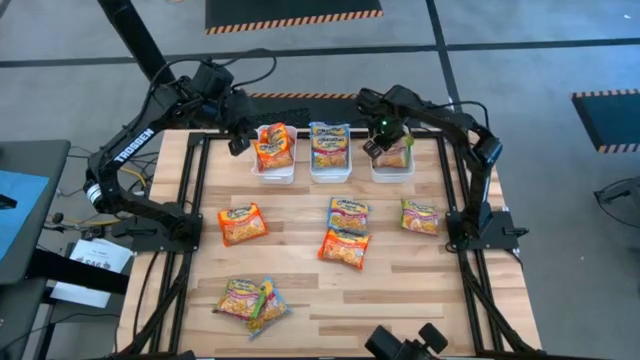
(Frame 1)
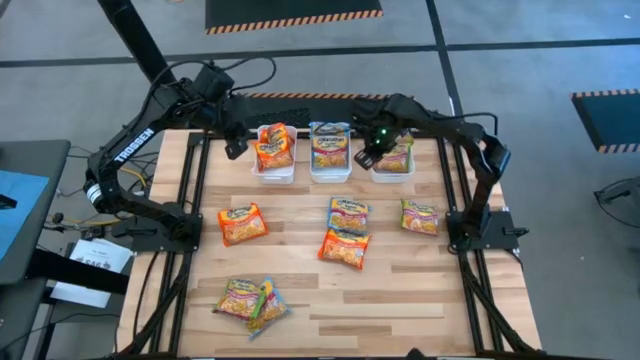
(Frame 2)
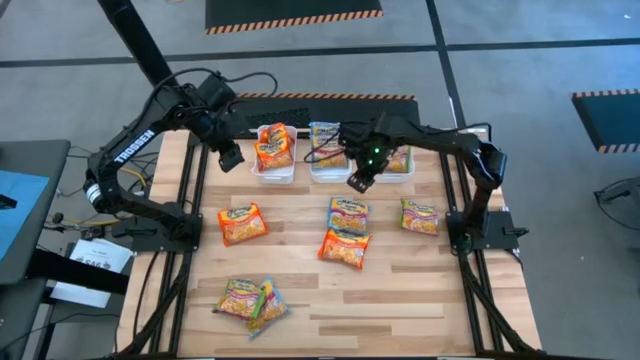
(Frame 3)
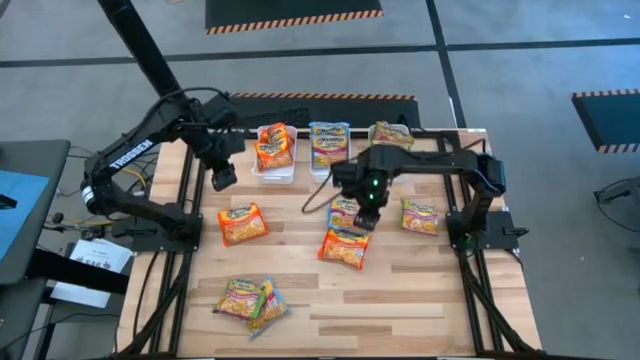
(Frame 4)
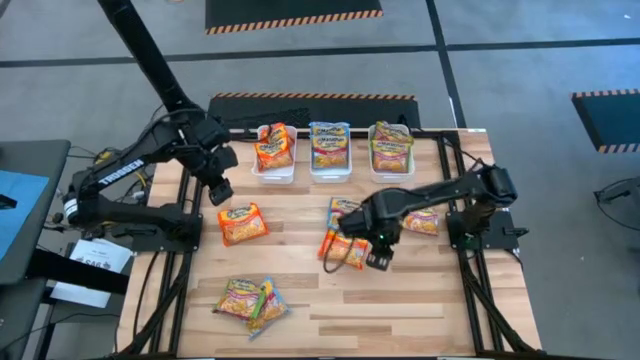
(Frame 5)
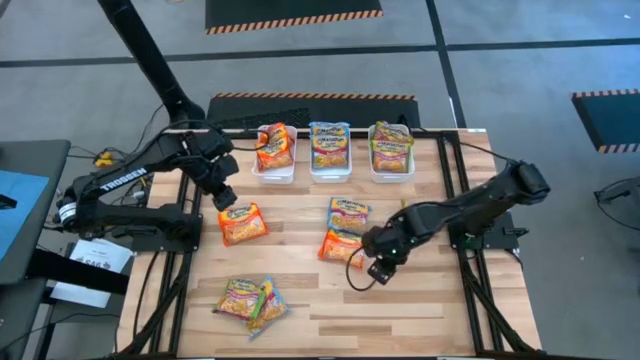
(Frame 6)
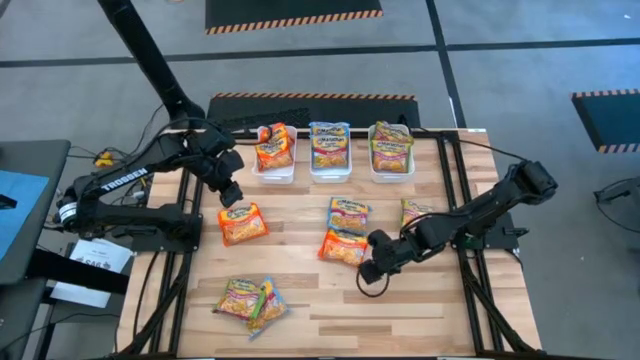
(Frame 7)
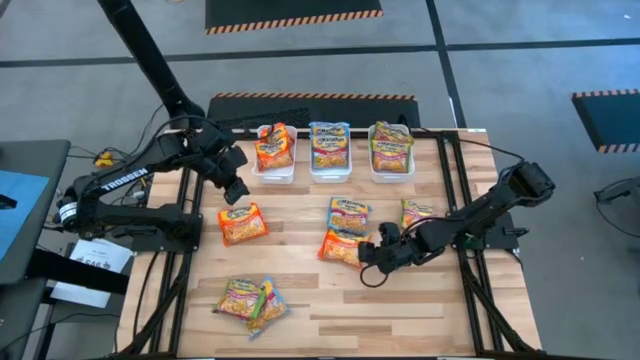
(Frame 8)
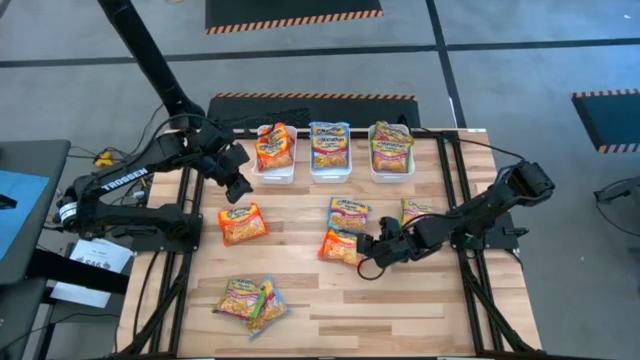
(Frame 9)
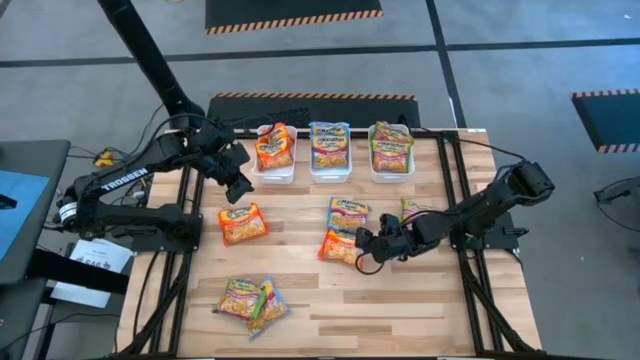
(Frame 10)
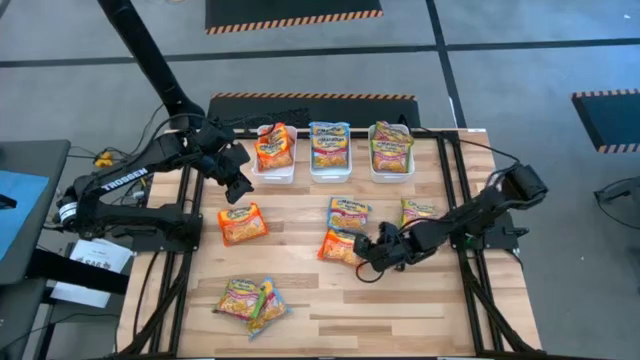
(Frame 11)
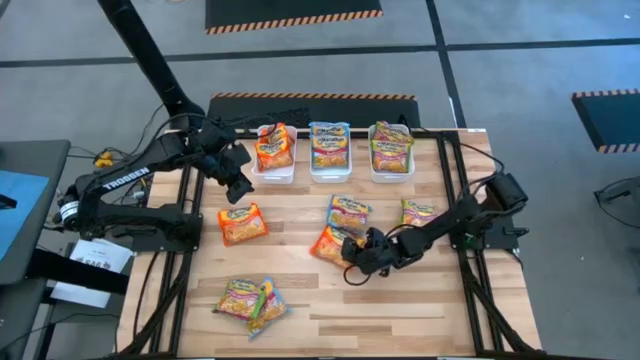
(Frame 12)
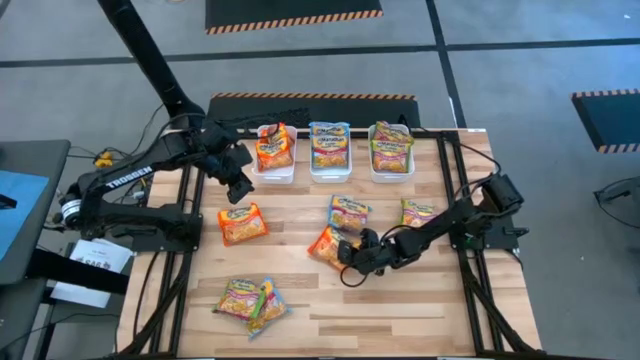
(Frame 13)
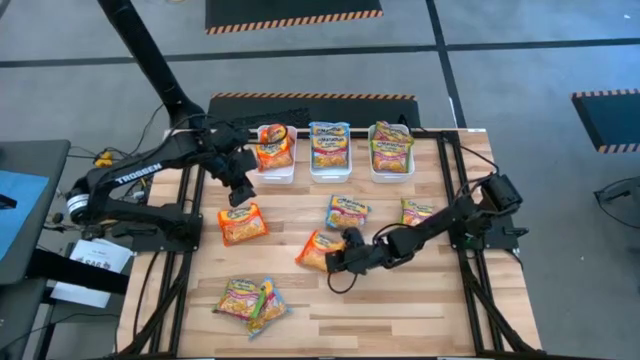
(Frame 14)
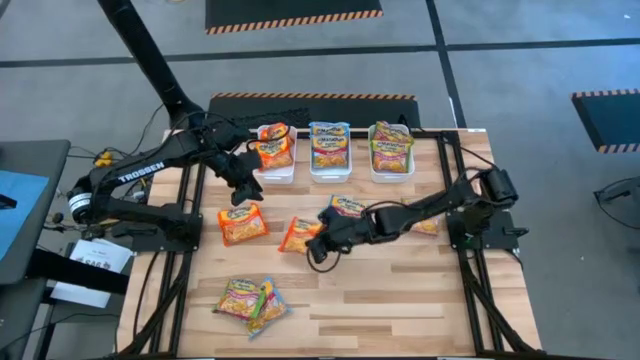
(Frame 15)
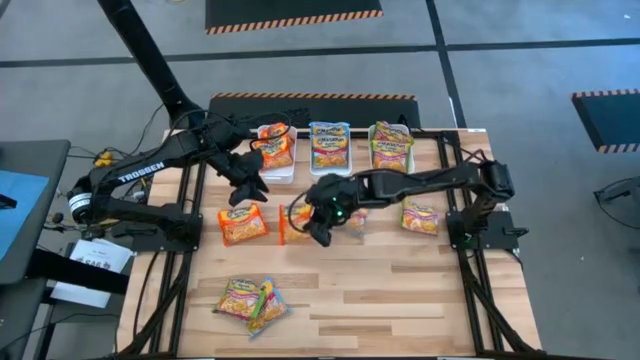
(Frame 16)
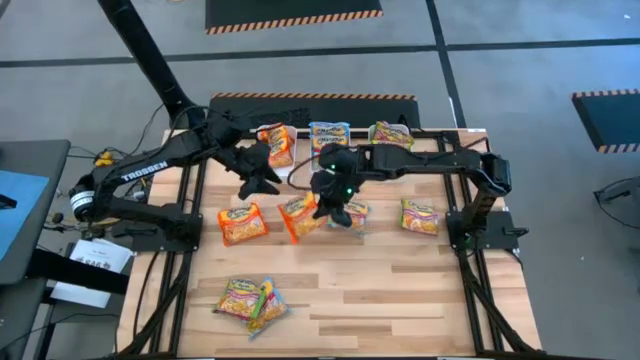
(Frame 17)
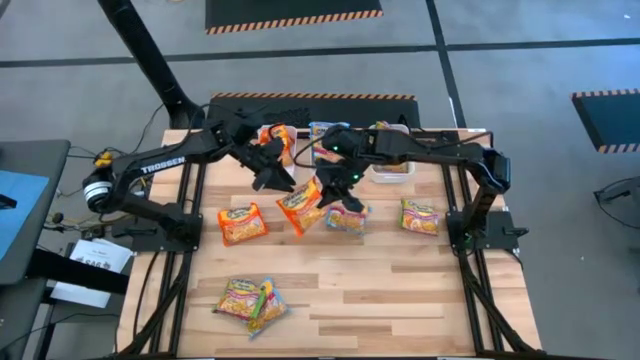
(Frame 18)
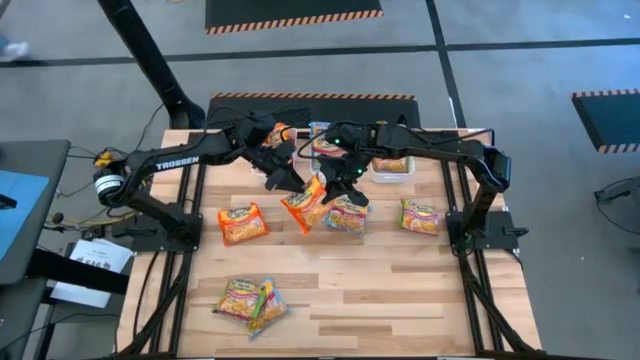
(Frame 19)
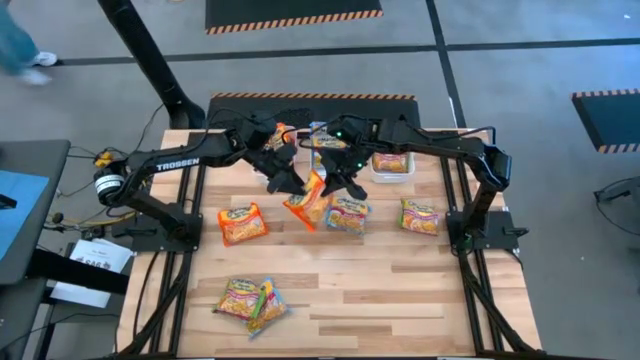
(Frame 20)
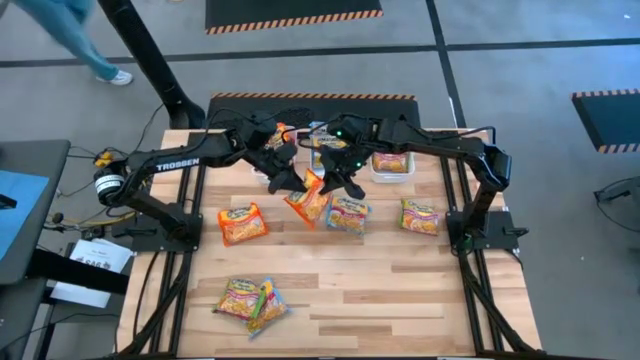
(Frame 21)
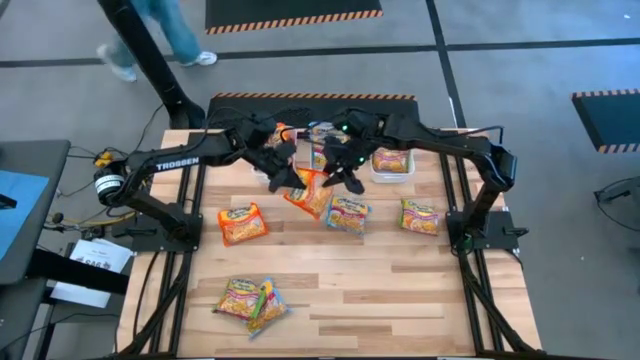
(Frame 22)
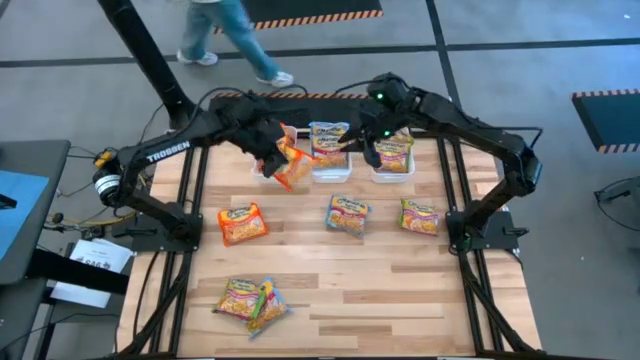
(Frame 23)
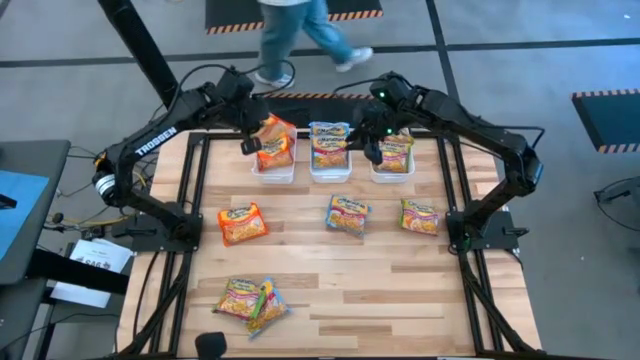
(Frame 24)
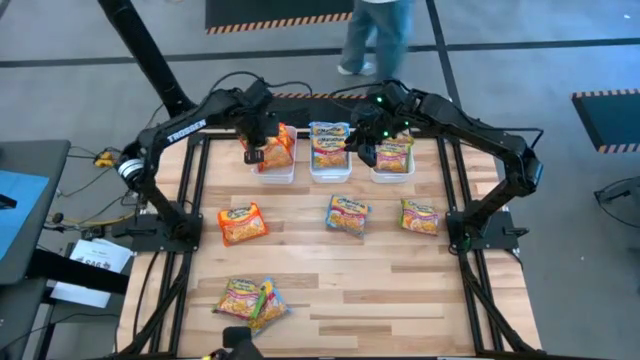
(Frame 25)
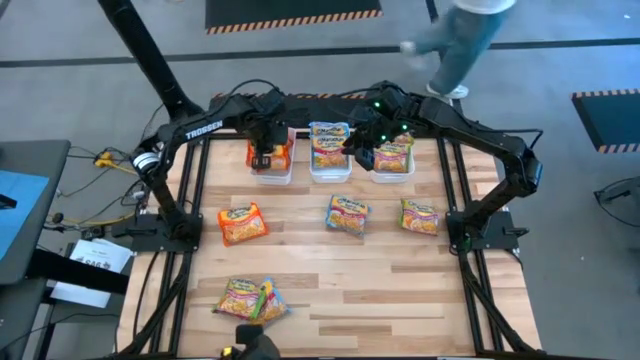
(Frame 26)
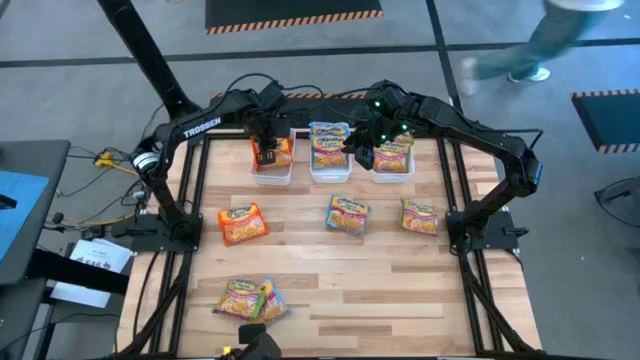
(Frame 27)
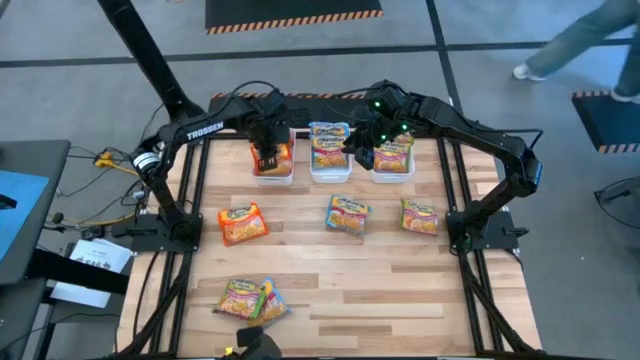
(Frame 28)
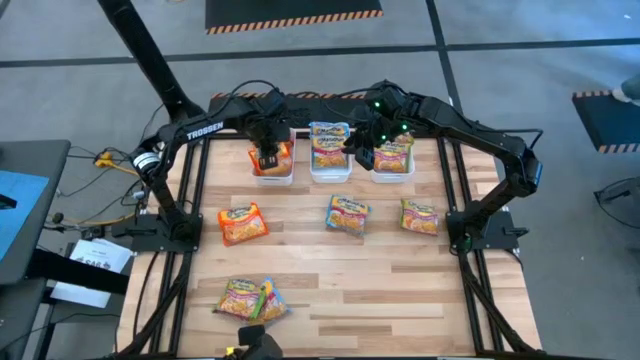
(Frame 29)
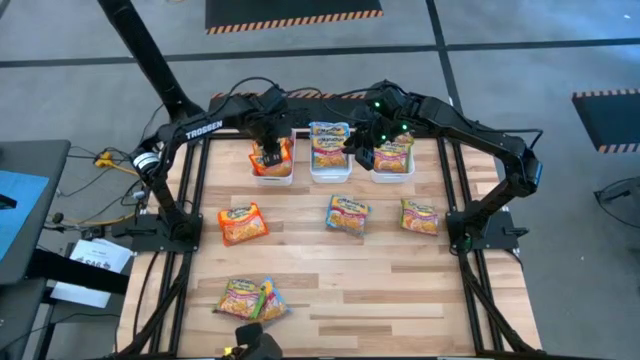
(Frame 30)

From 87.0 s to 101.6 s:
Task: Sort Maruchan noodles
Put the orange noodle pack into the left white bin

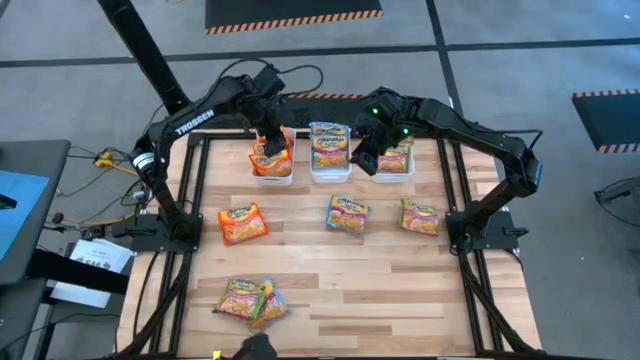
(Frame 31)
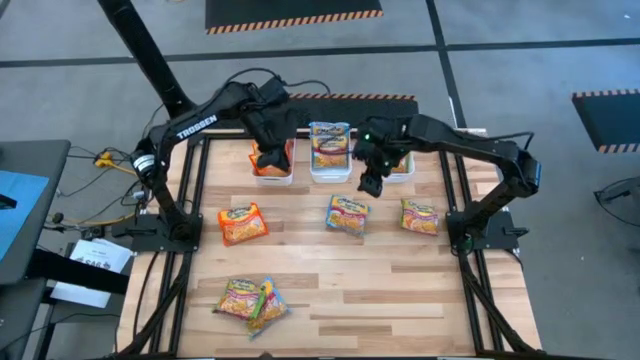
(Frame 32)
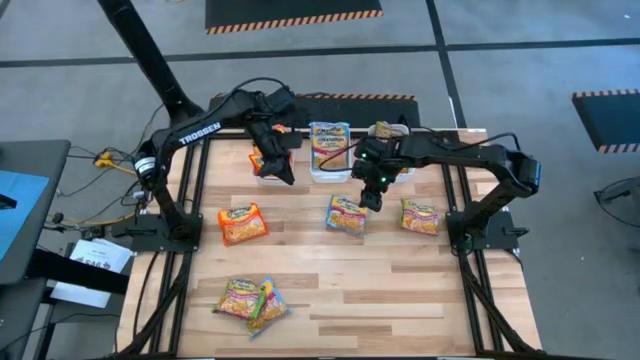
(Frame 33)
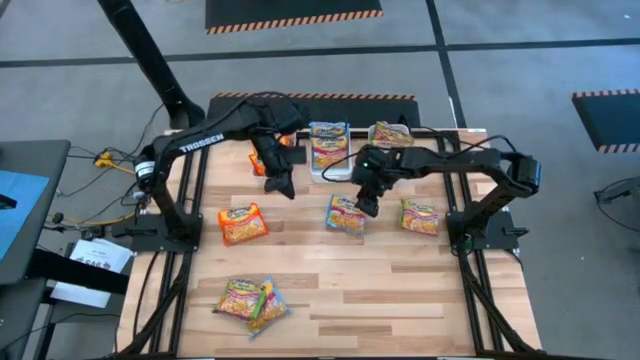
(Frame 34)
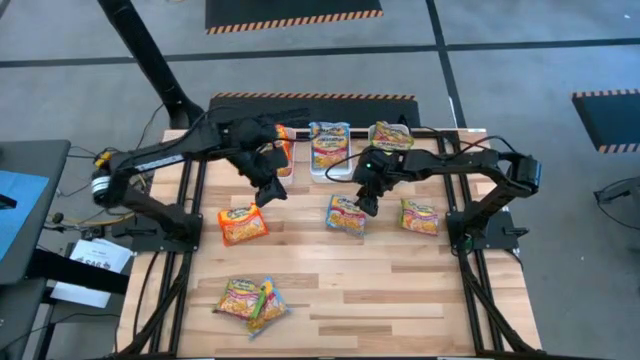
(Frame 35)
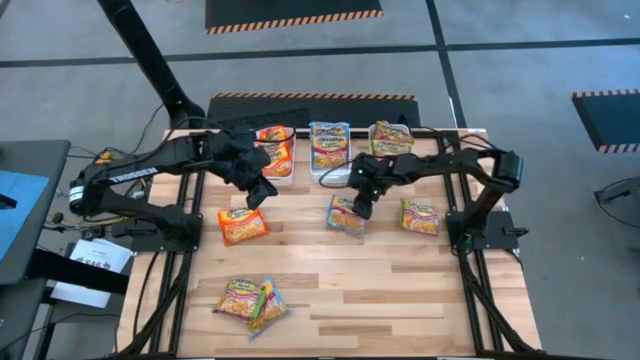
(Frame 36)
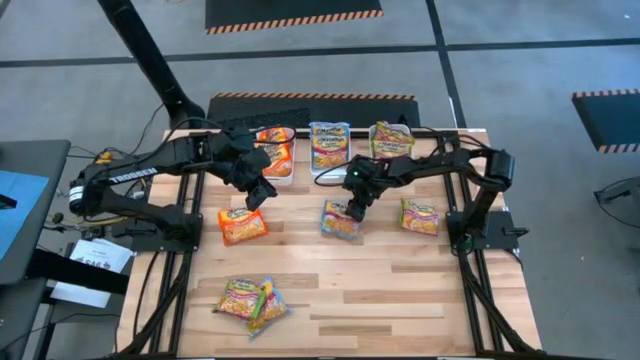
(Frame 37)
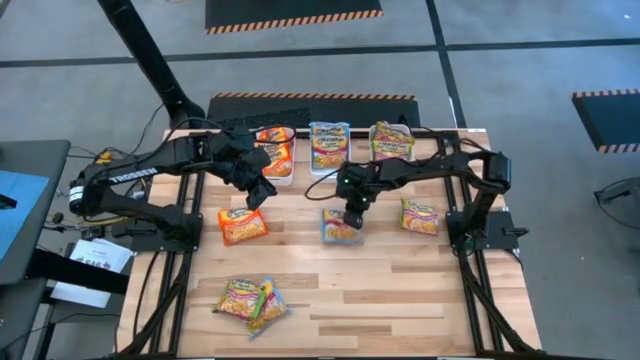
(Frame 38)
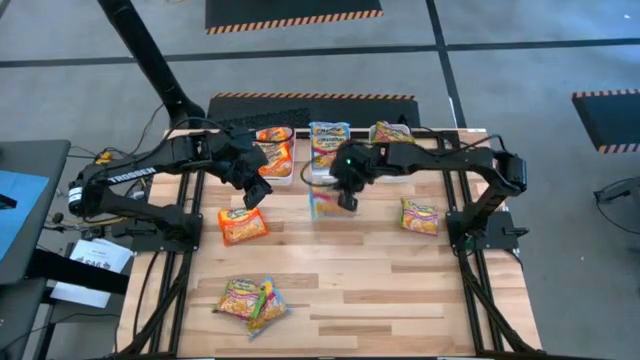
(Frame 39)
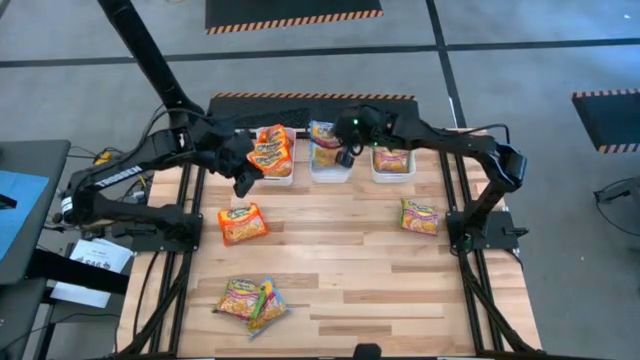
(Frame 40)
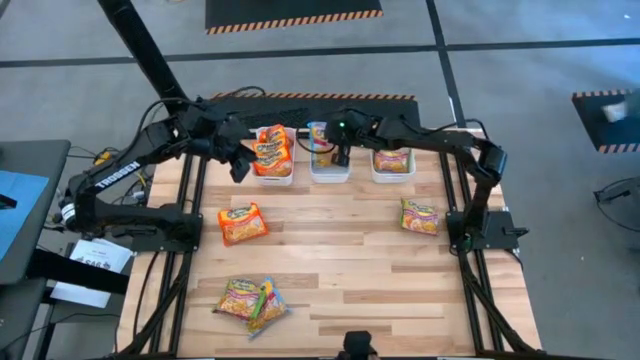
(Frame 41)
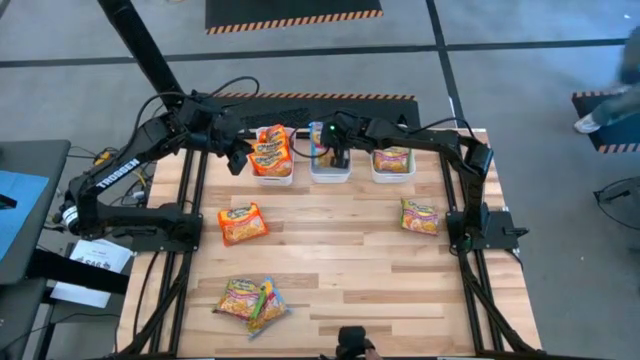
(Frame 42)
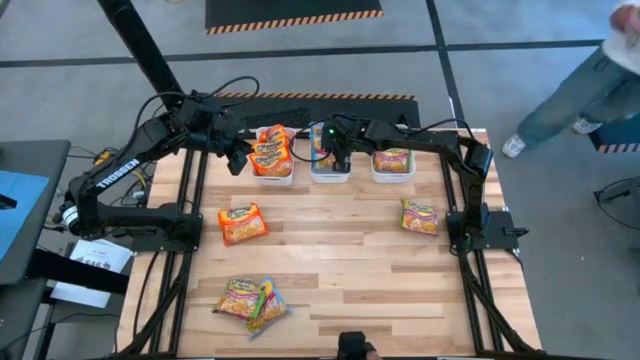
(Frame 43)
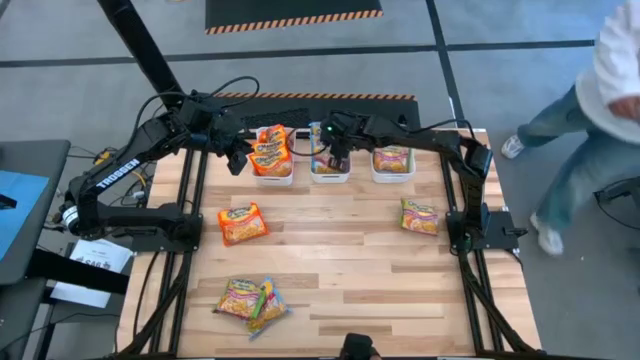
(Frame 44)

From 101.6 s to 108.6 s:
Put the blue noodle pack into the center white bin
